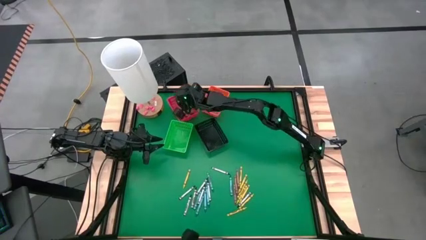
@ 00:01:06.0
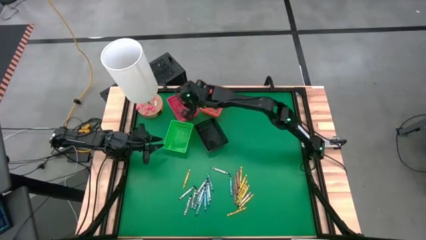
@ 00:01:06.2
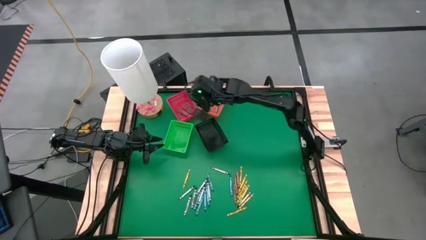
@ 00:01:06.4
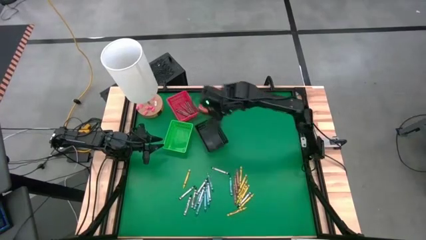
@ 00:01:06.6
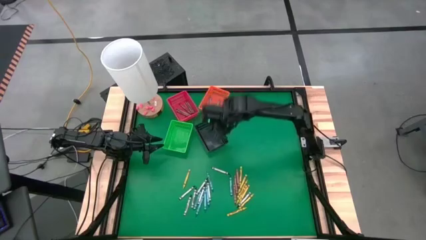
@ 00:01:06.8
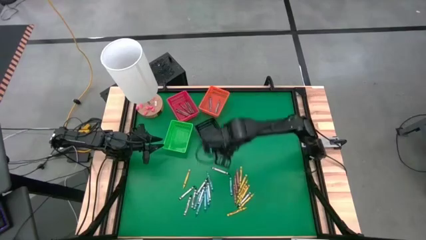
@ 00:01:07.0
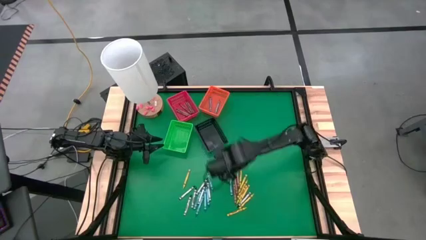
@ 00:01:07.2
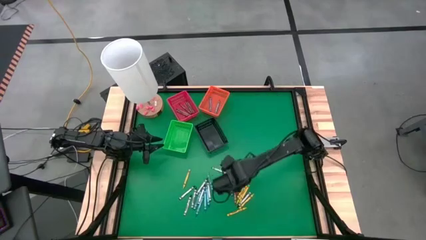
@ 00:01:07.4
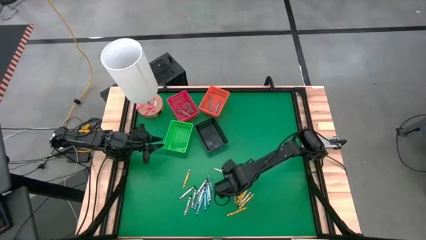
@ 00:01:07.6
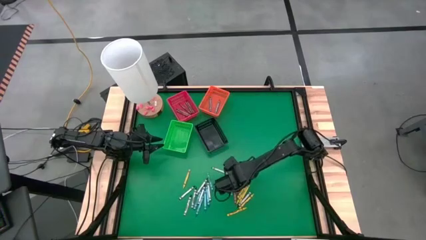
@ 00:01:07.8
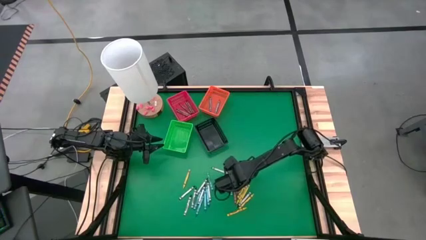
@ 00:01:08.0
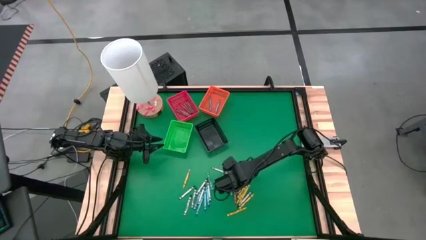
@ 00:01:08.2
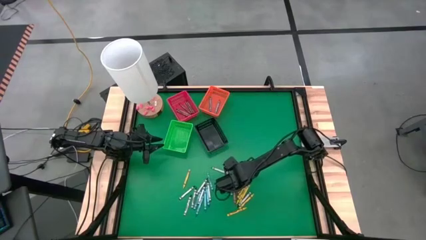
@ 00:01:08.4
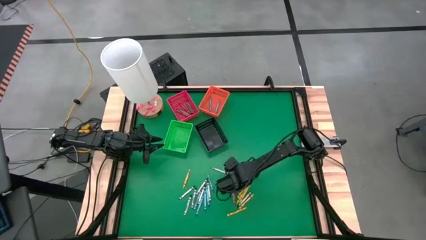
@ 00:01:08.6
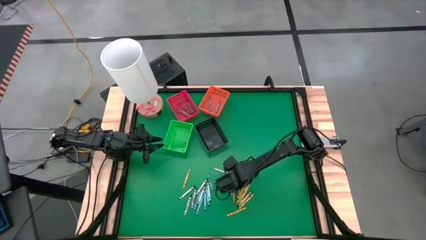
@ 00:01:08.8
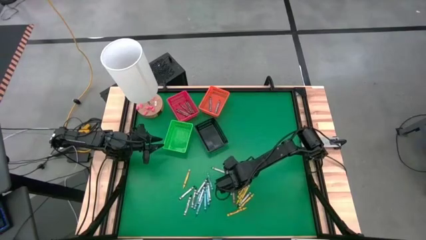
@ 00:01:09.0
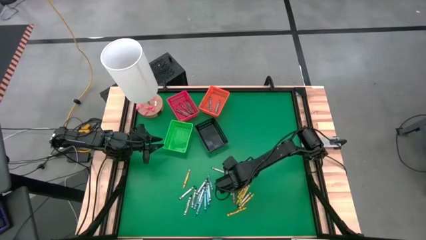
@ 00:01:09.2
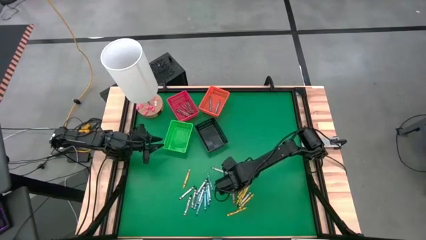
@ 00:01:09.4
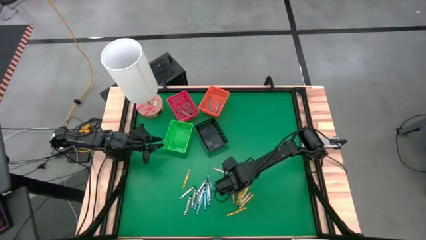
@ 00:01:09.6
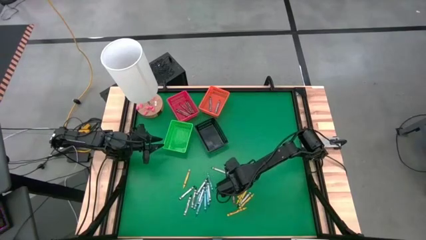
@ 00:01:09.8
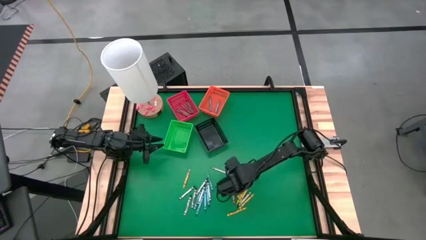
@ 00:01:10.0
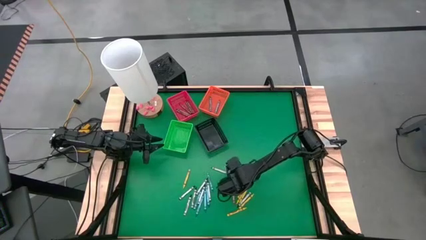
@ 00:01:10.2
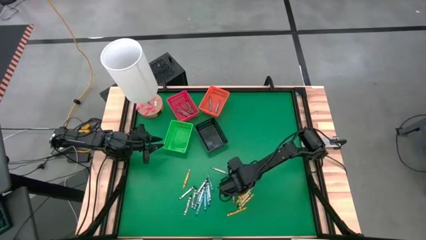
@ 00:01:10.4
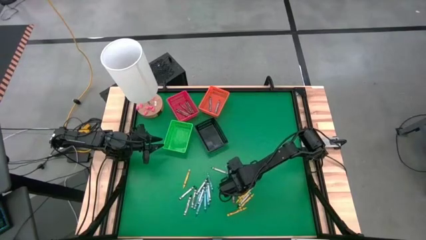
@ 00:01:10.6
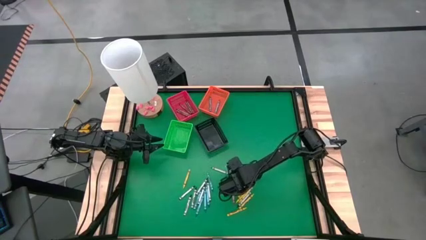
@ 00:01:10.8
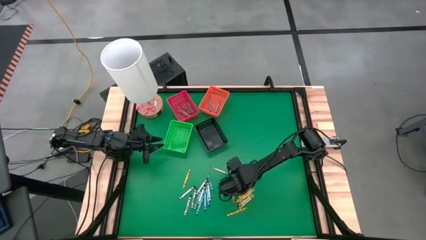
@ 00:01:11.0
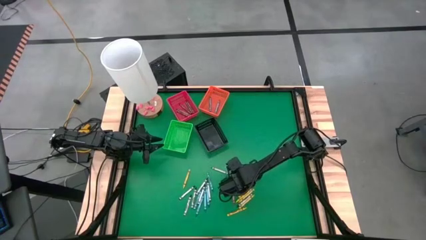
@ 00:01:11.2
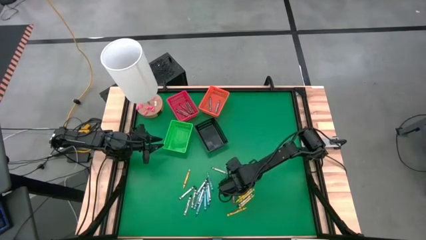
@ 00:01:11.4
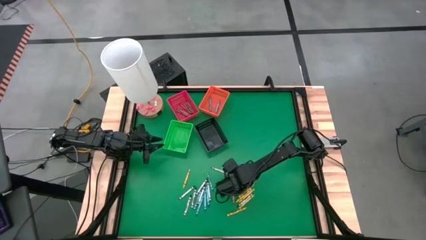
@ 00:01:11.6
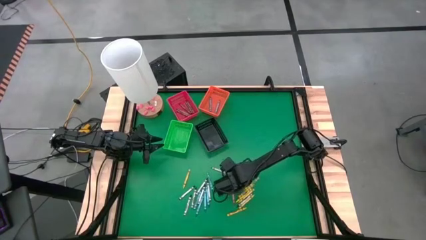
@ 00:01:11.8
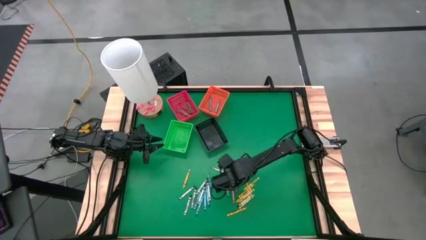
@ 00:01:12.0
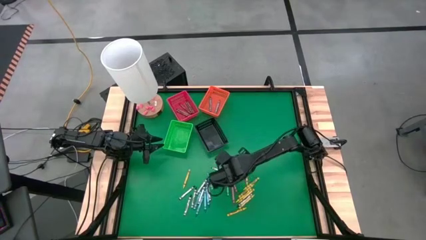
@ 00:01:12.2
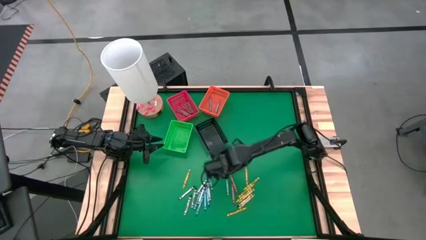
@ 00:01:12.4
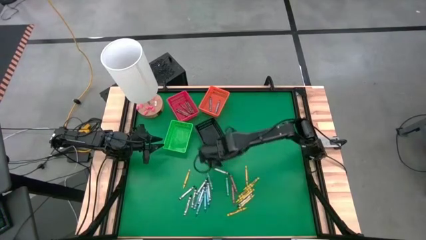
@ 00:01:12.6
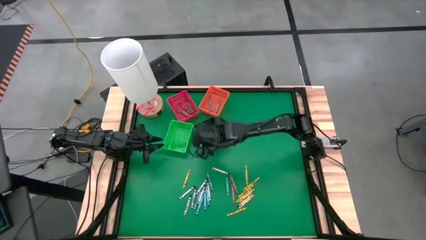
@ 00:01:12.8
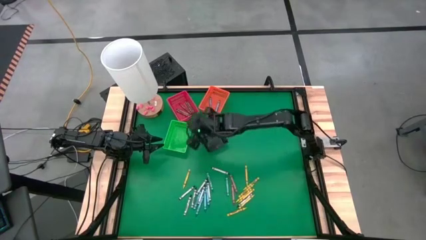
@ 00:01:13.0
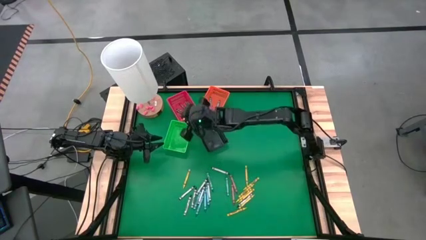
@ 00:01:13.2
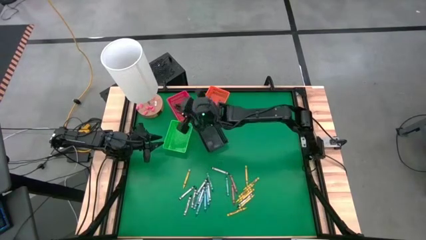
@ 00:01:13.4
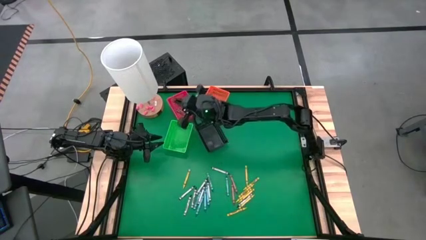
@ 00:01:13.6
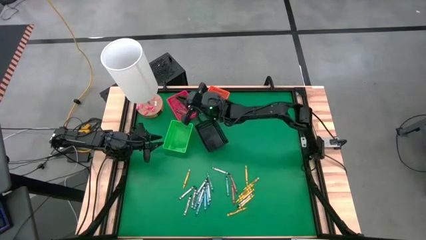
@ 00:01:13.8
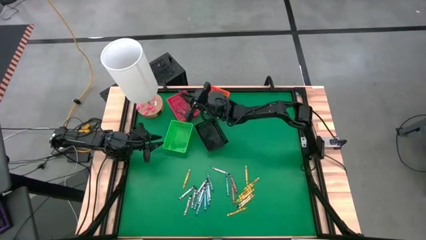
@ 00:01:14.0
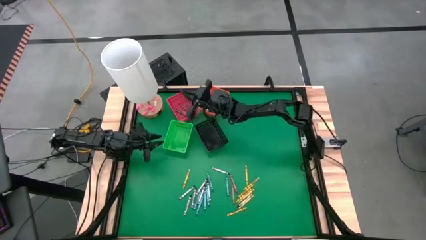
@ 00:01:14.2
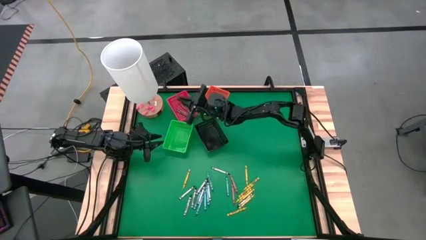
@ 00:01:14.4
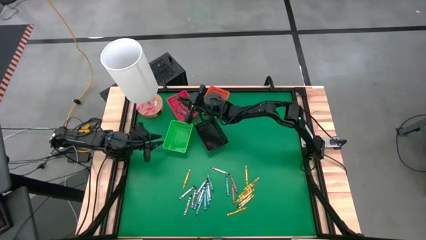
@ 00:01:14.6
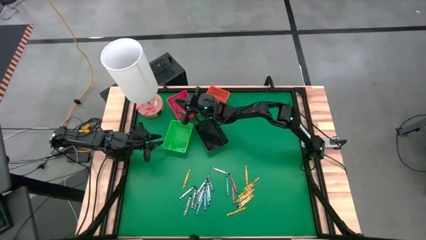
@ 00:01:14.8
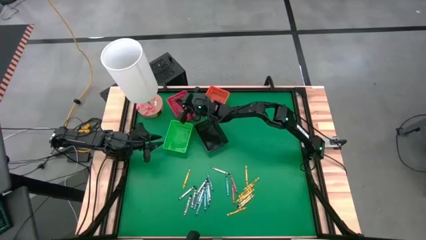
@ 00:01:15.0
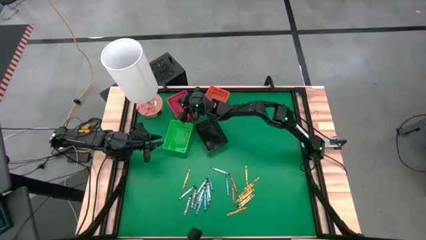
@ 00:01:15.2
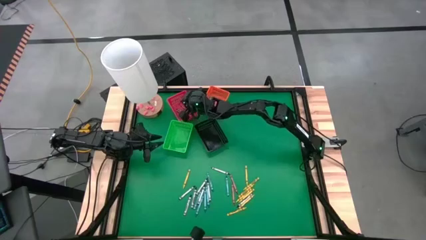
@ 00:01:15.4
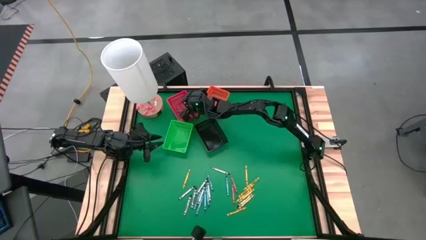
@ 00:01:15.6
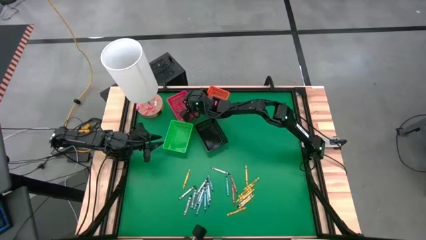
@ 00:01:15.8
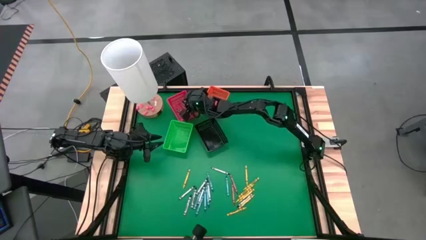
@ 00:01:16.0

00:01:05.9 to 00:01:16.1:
Task: Sort crayons
Put the brown crayon into the red bin

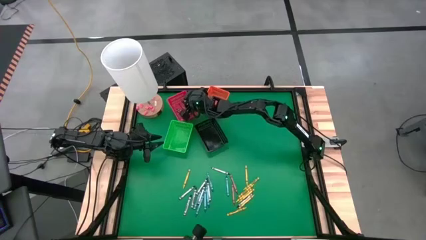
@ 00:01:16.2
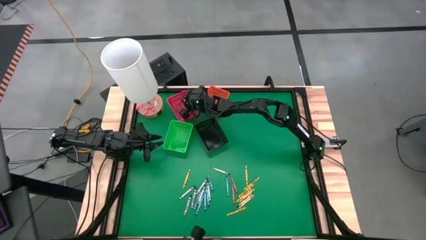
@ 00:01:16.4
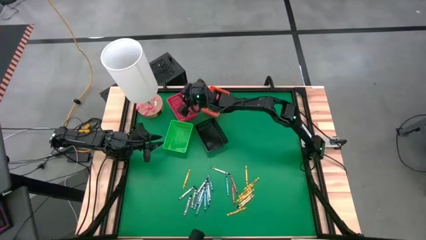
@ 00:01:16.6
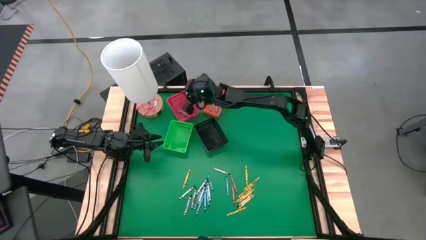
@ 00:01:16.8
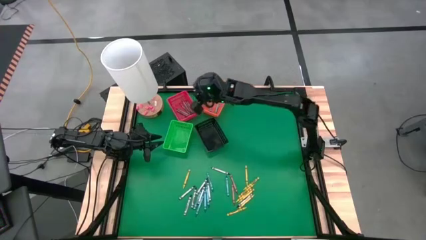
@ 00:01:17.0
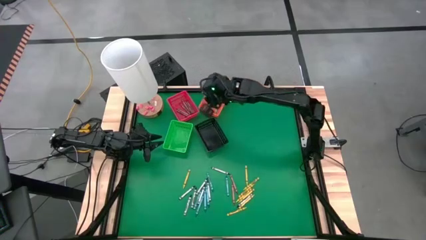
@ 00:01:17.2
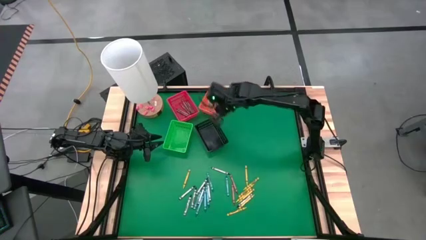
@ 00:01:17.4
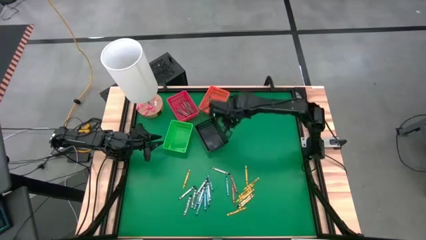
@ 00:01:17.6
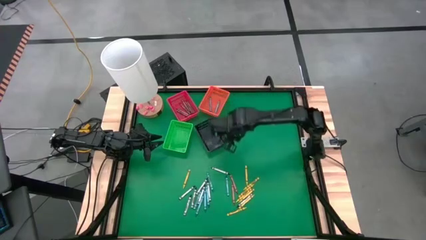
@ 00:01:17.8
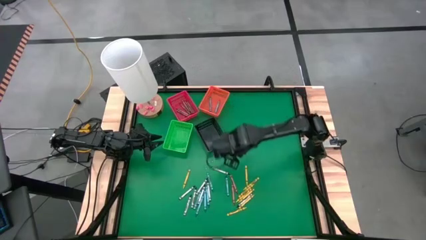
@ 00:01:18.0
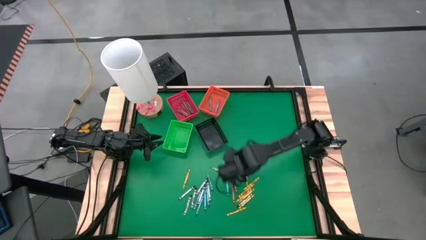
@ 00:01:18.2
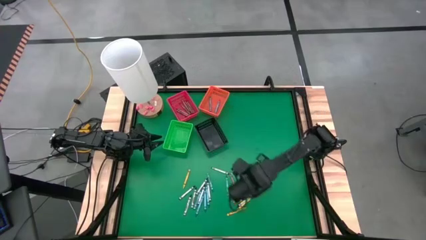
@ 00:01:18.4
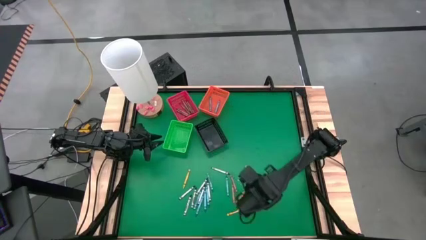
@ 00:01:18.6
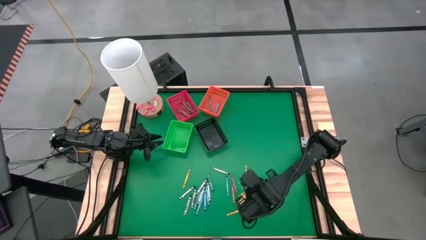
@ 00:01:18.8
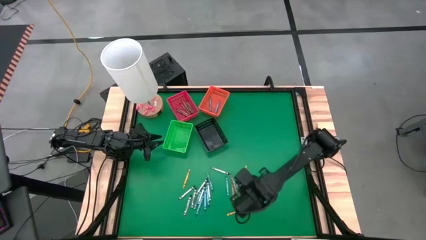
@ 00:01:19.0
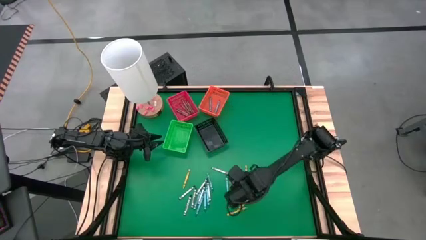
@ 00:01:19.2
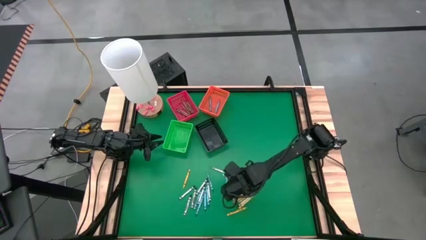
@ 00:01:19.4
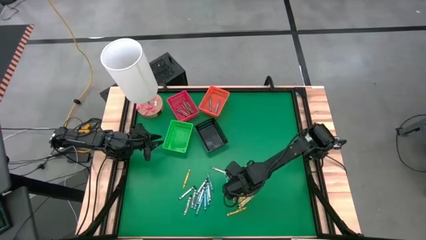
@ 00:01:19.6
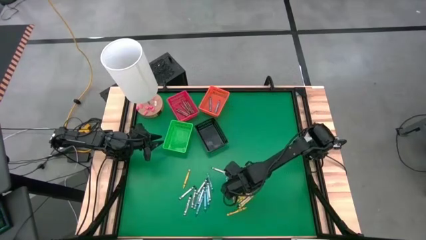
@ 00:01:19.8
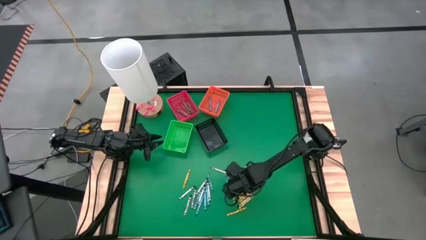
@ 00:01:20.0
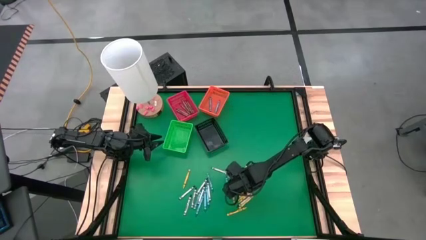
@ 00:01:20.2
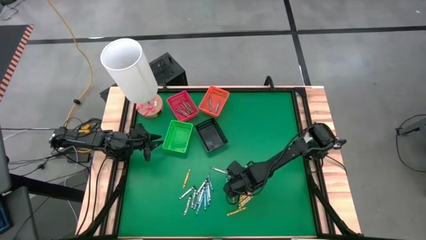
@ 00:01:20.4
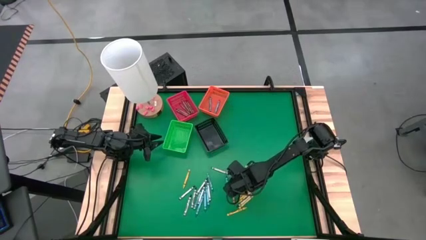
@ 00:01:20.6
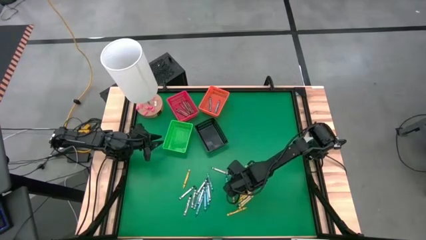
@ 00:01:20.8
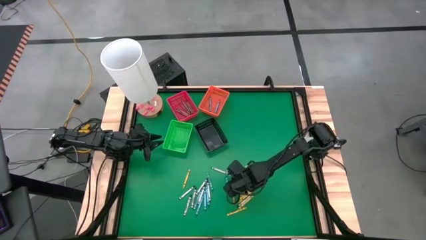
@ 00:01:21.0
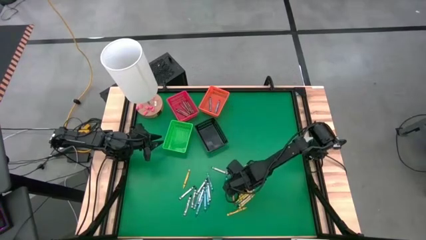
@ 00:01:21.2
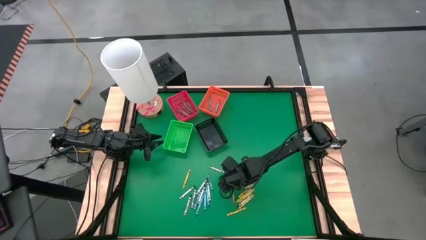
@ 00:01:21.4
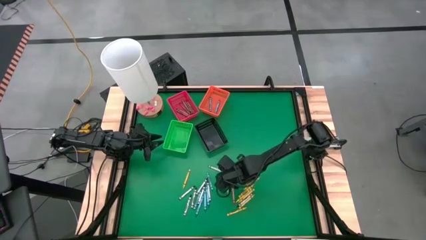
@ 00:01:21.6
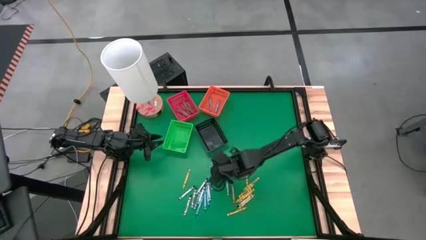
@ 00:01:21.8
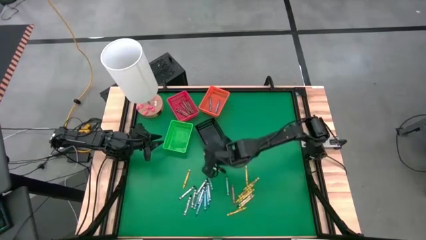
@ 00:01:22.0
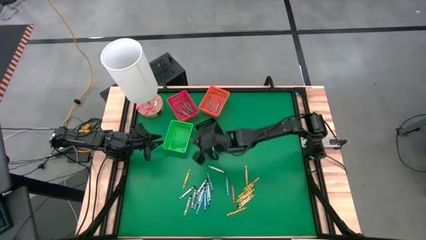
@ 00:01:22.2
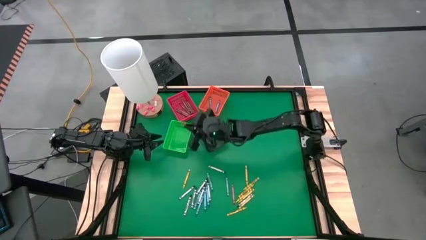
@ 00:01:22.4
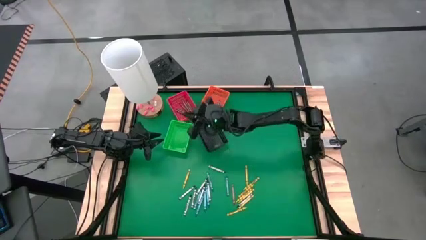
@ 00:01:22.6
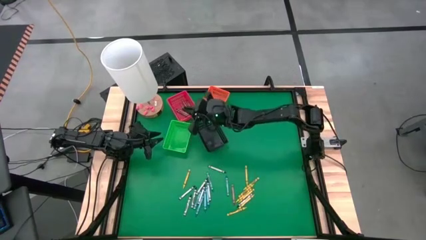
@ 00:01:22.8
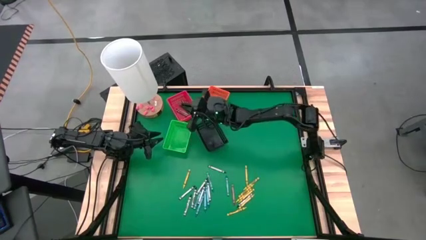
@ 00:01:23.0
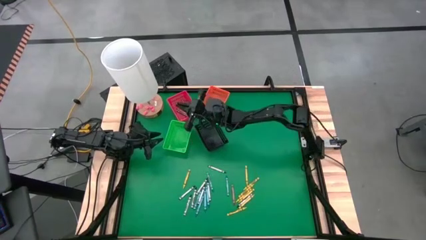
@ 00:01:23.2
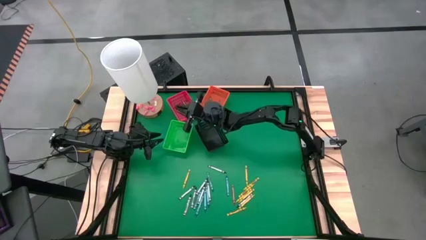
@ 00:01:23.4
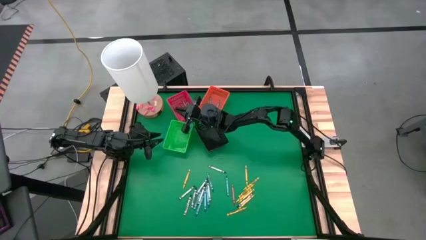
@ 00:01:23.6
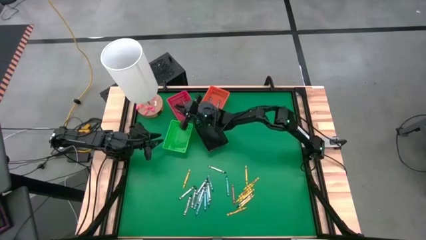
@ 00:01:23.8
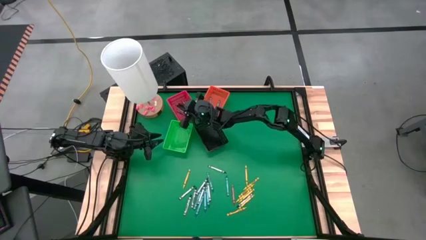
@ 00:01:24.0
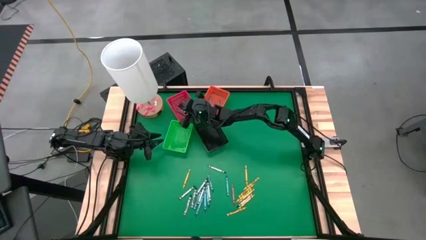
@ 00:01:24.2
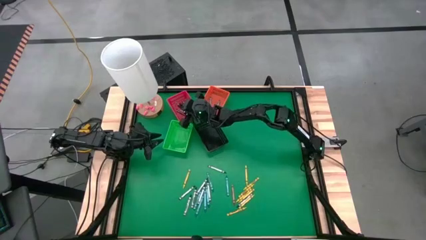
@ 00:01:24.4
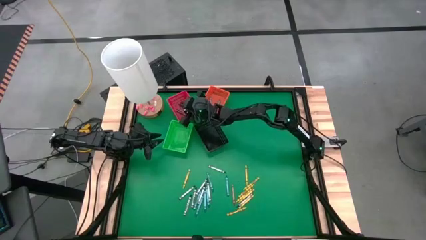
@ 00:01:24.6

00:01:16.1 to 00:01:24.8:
Put the brown crayon into the red bin
